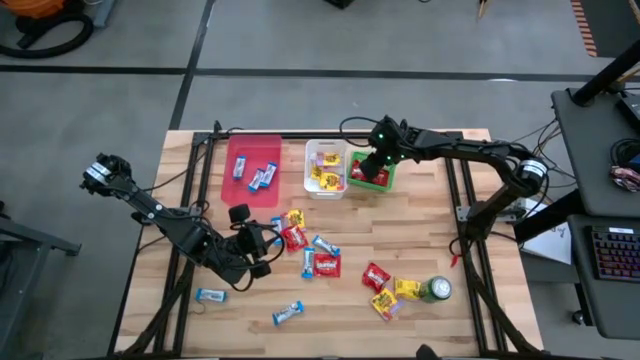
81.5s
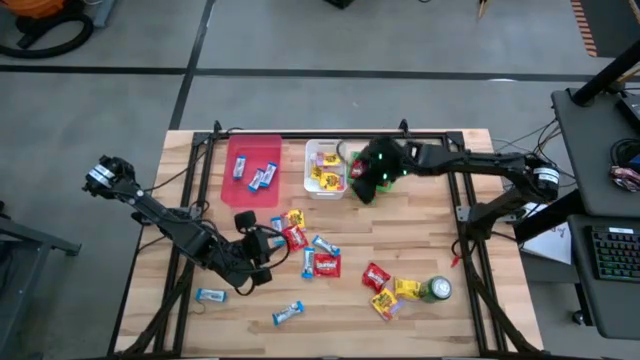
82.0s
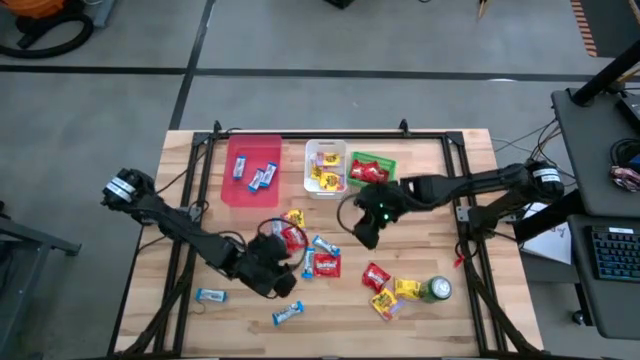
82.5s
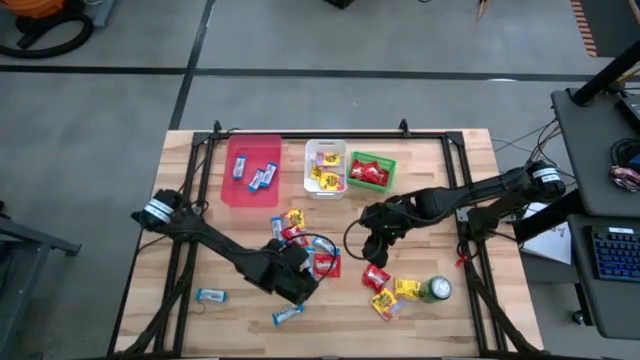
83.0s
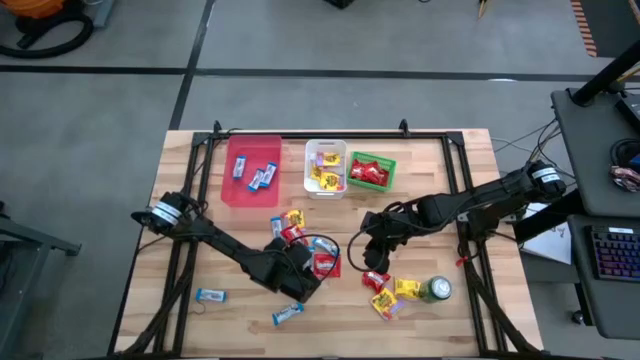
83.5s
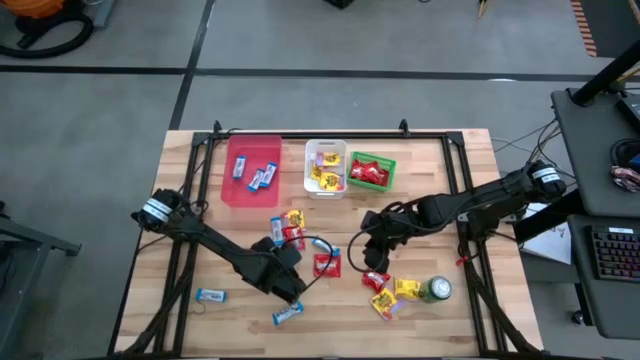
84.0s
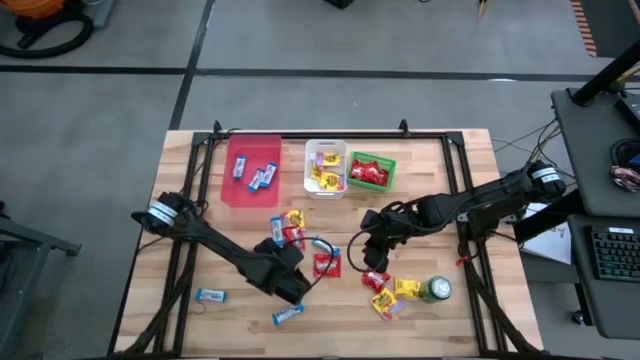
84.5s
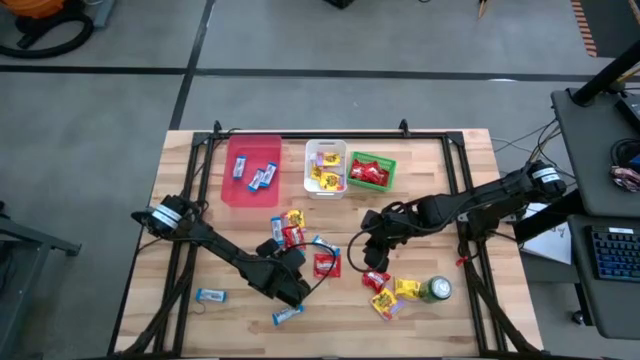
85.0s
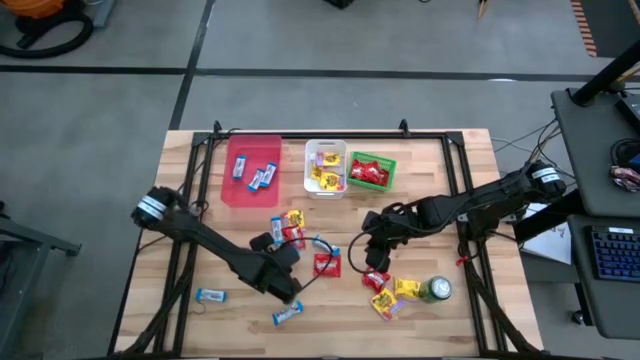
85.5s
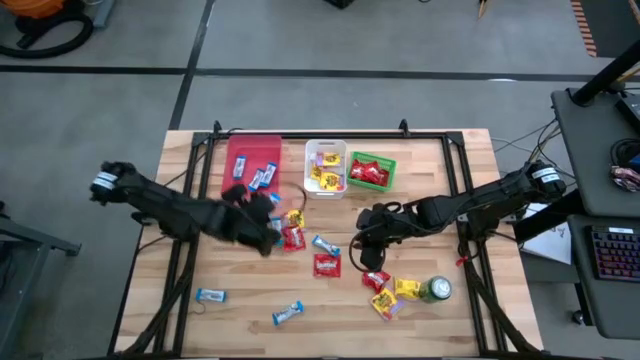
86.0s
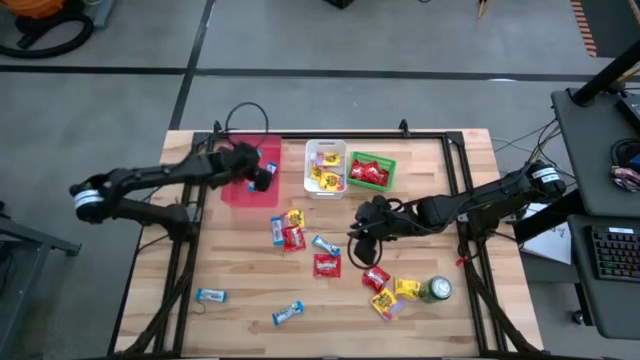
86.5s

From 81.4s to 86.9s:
Task: Sort candy
Put the white chocolate into the pink bin

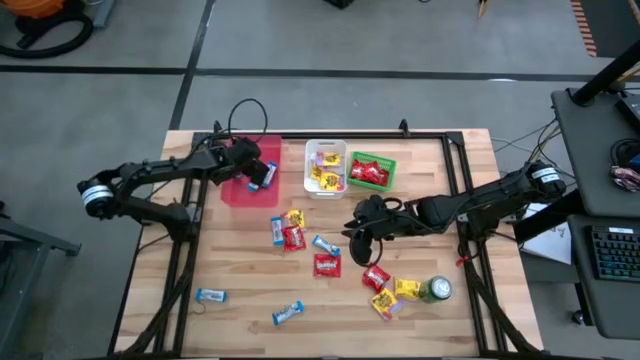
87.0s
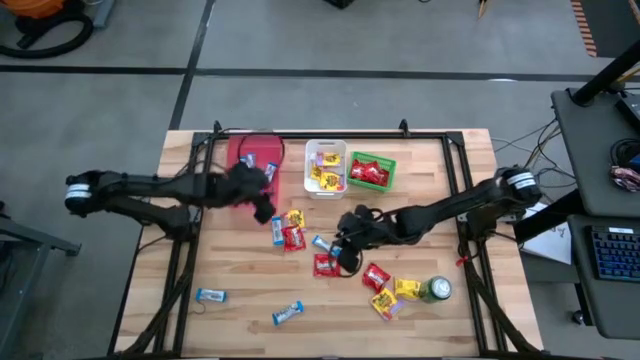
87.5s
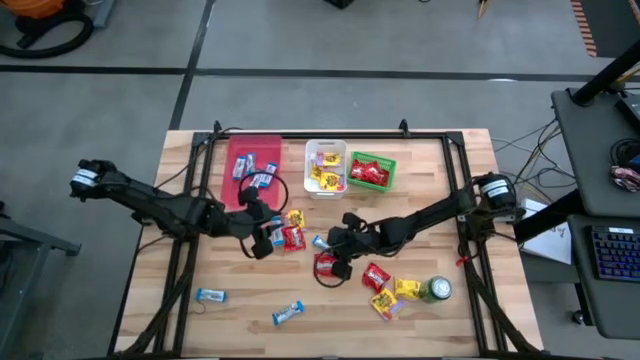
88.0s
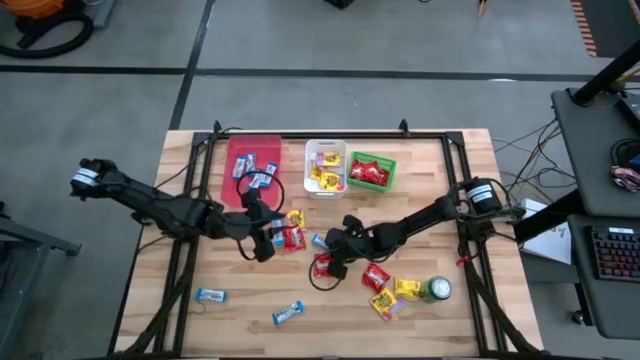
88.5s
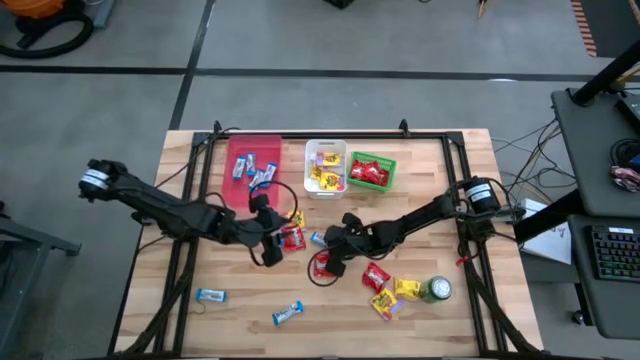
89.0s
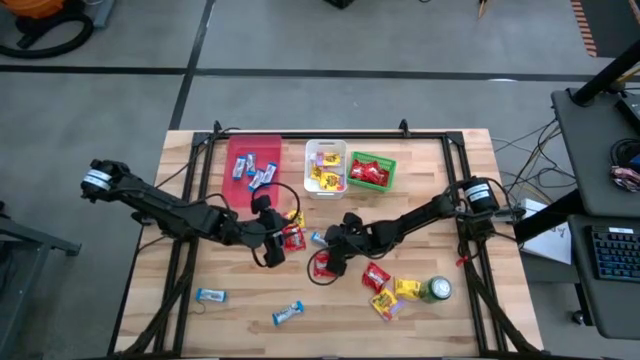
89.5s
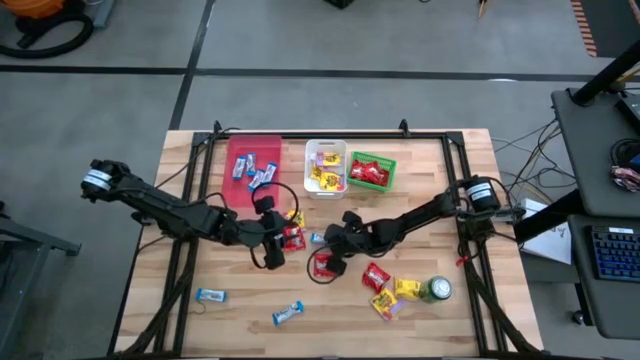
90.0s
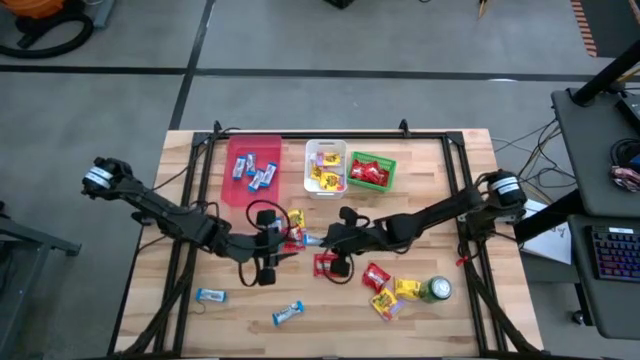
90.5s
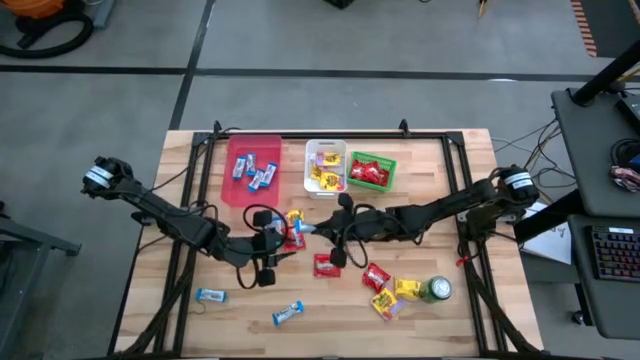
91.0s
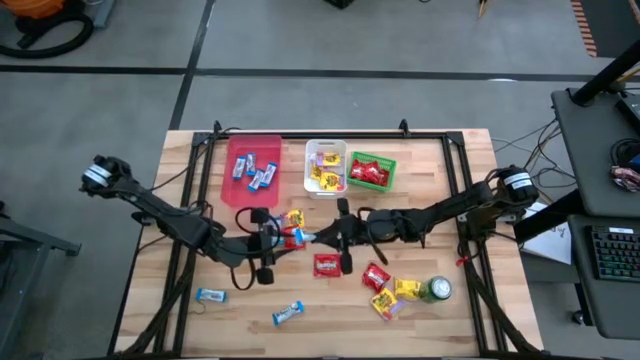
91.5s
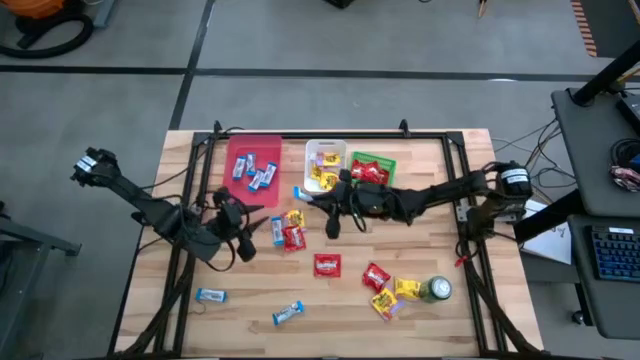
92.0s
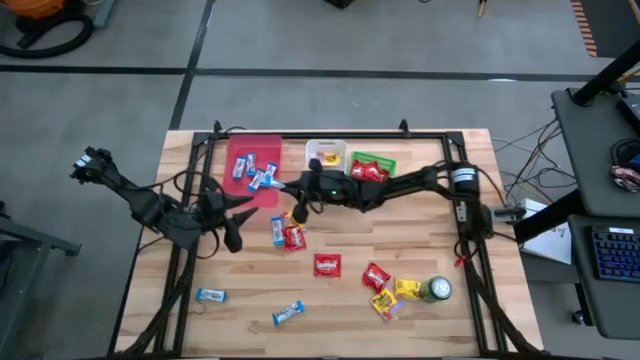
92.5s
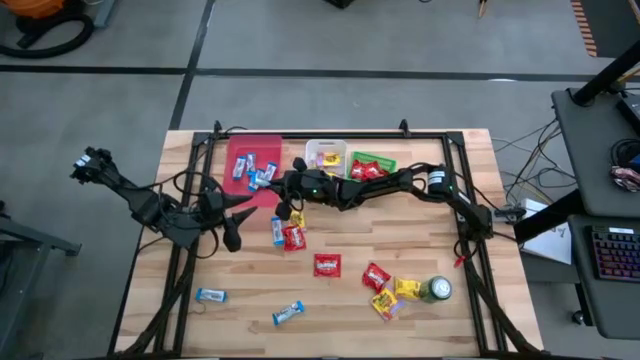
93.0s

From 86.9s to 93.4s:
Put the white chocolate into the pink bin

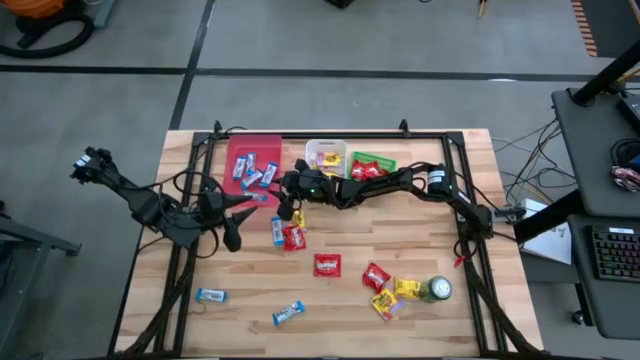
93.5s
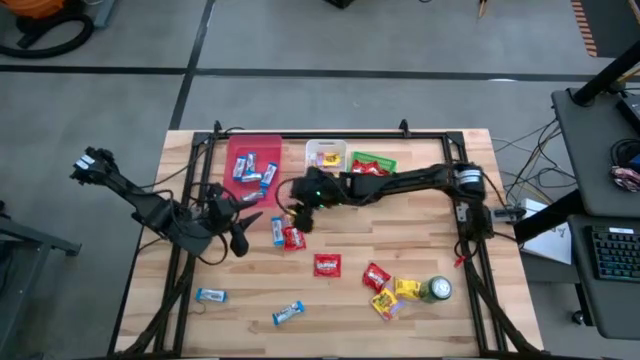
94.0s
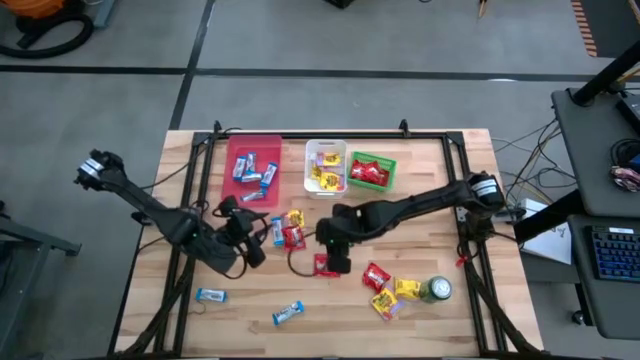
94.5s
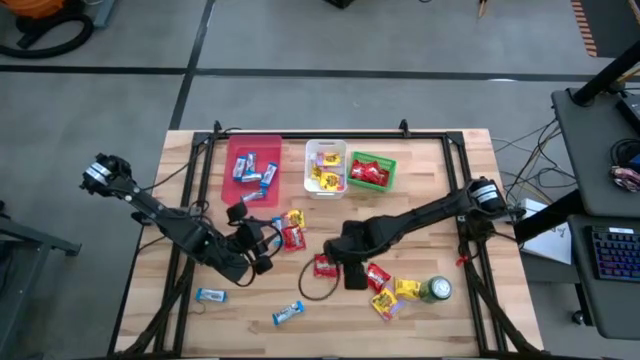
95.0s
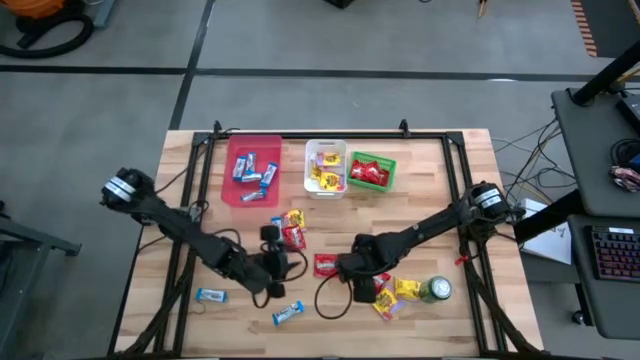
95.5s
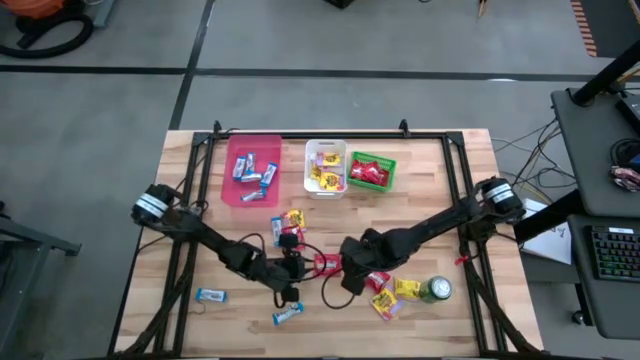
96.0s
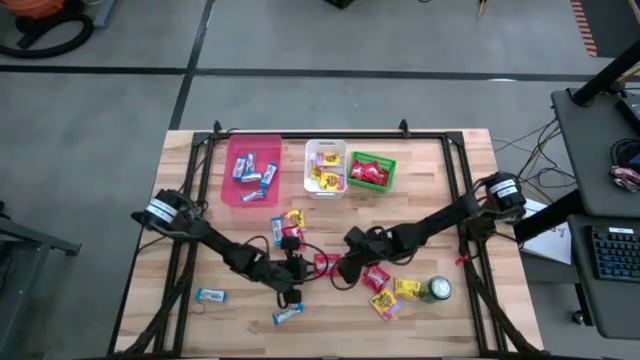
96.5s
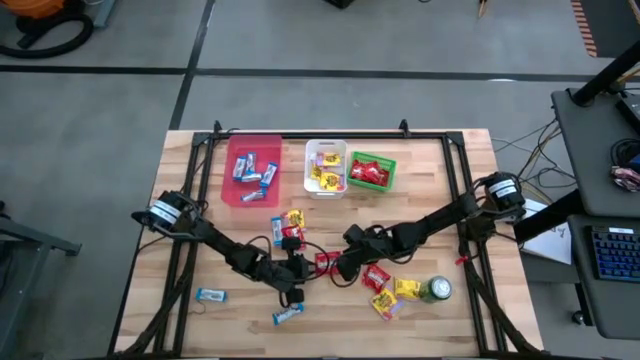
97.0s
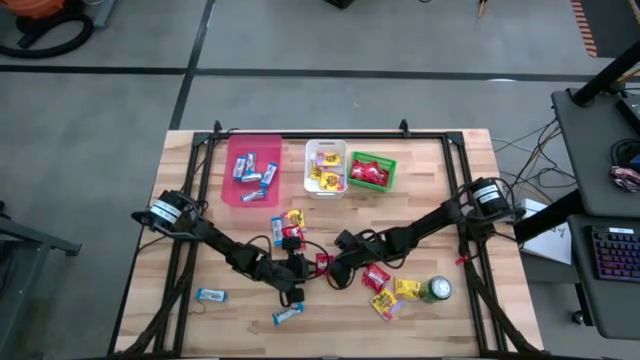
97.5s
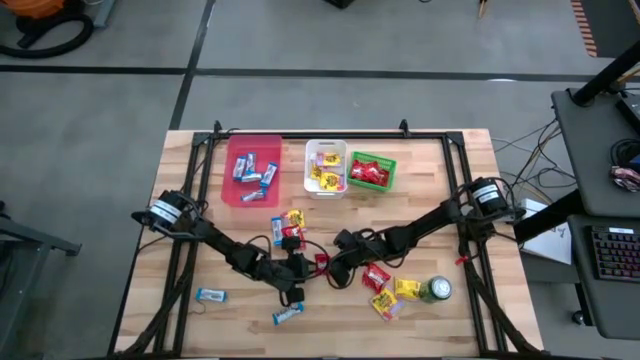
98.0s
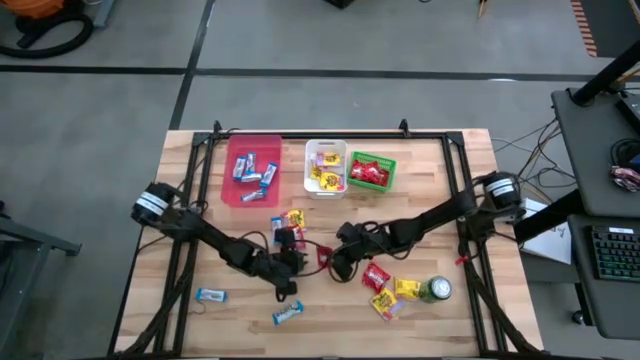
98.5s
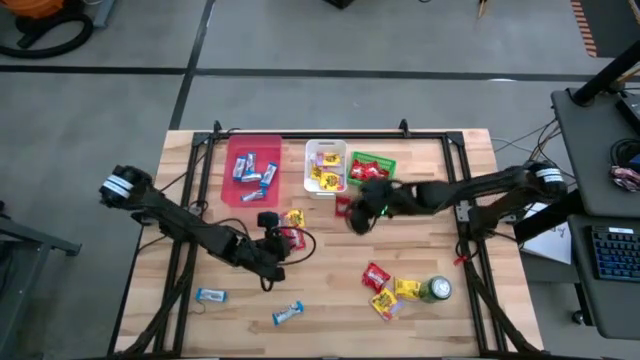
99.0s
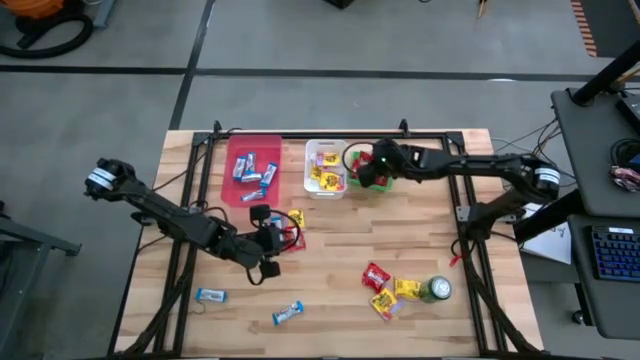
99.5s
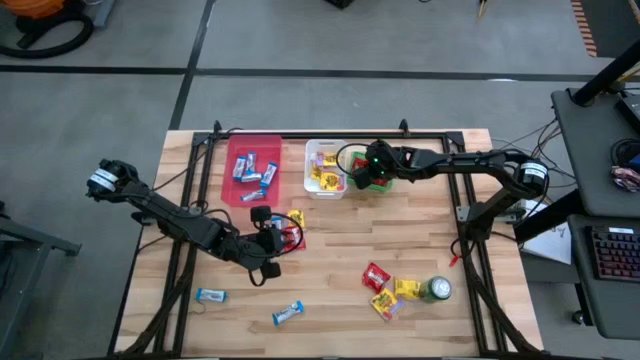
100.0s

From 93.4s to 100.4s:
Put the red candy into the green bin

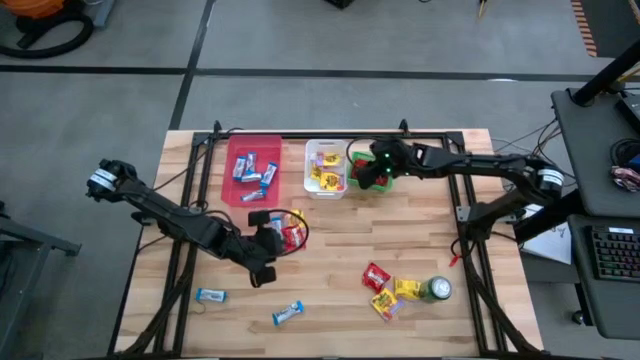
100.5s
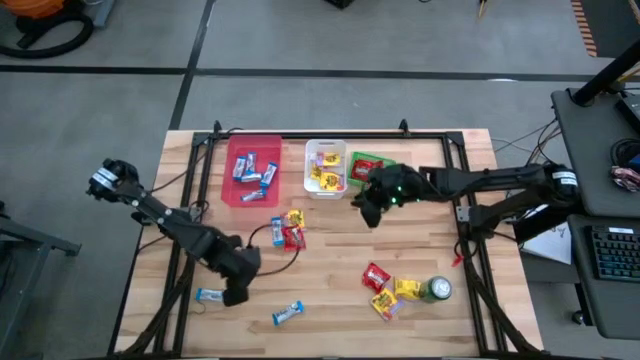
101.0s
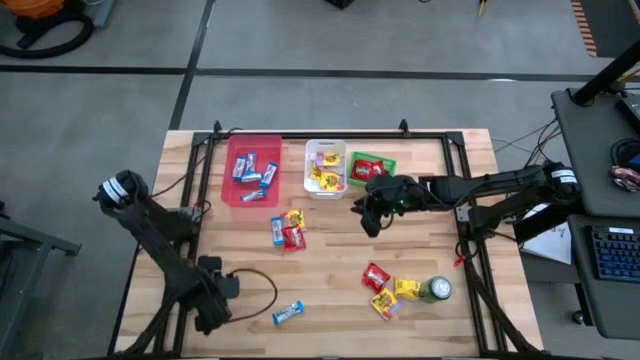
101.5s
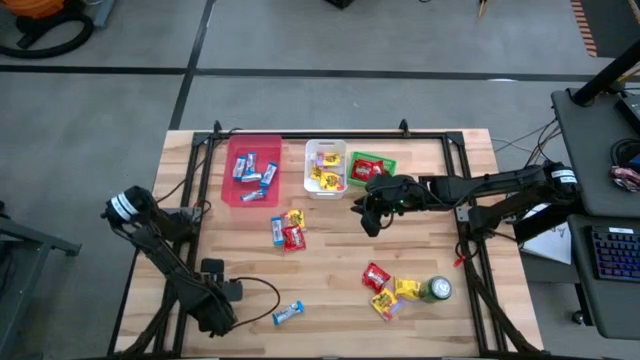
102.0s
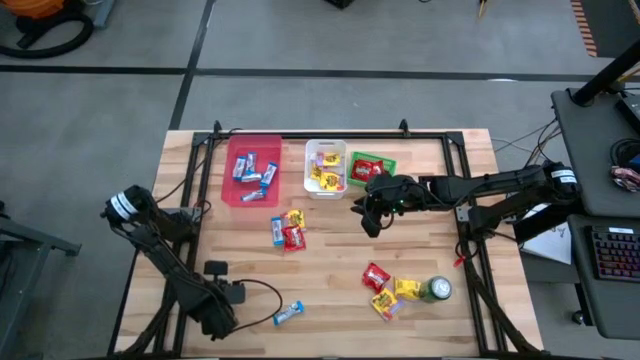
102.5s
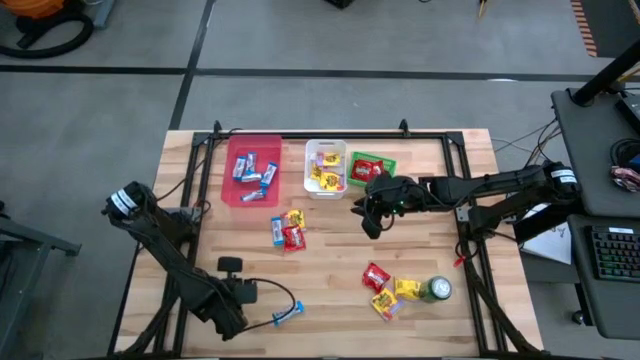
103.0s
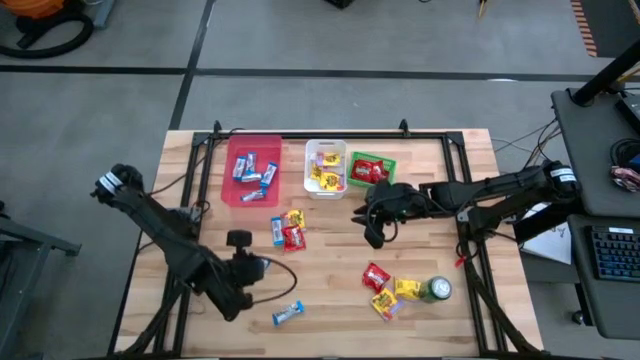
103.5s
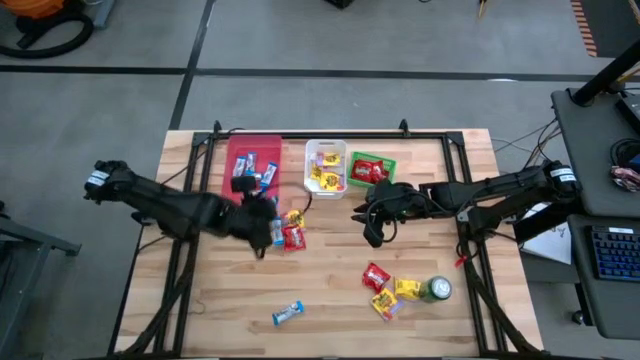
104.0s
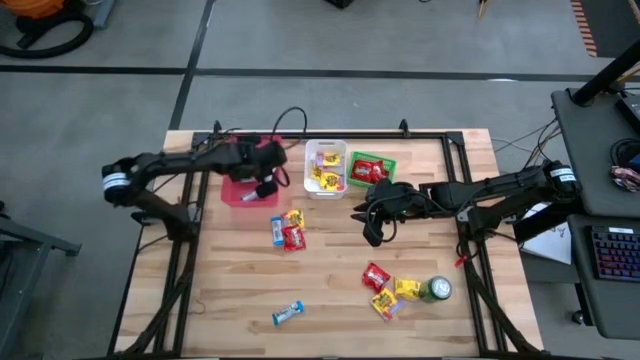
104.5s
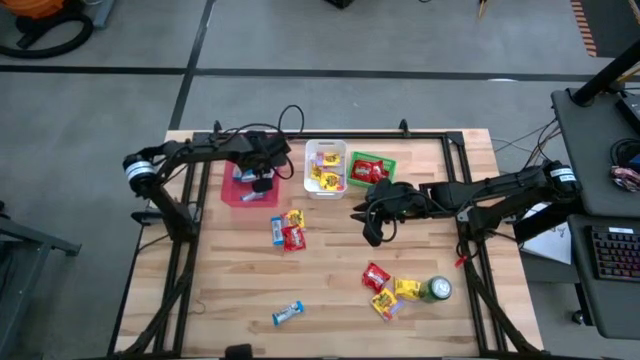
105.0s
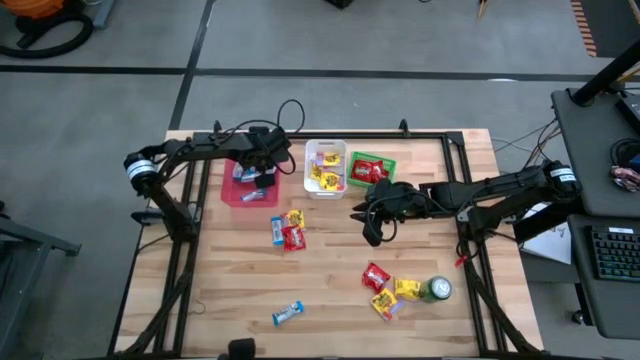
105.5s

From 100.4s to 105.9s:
Put the white chocolate into the pink bin
